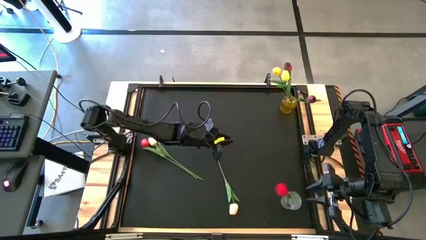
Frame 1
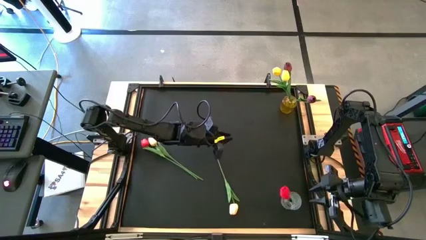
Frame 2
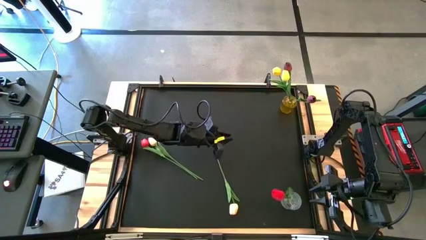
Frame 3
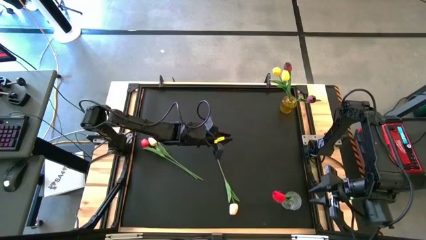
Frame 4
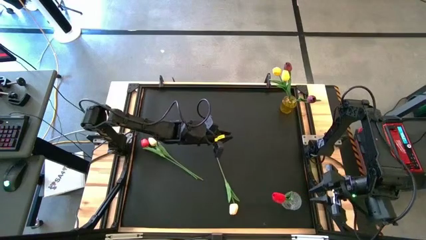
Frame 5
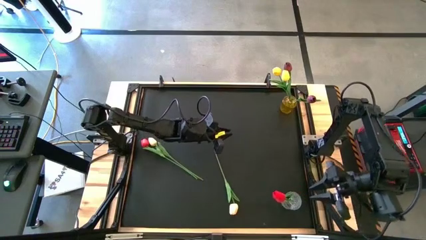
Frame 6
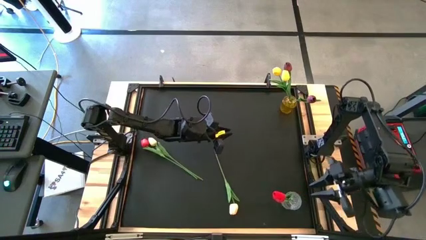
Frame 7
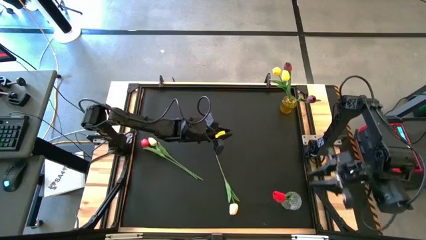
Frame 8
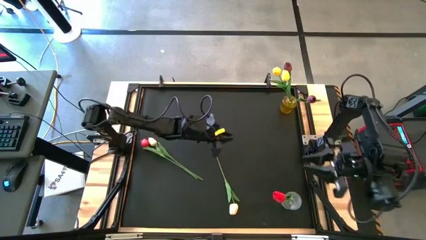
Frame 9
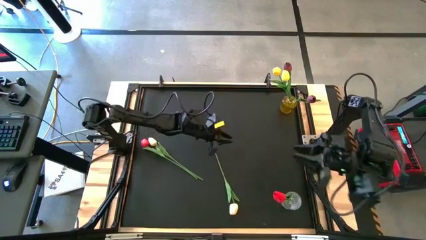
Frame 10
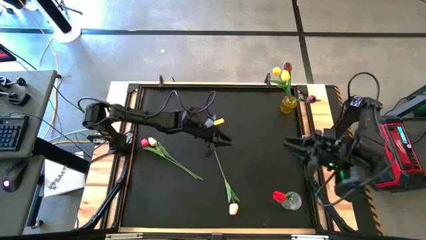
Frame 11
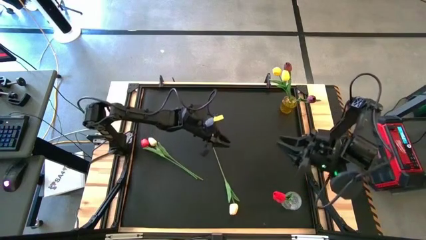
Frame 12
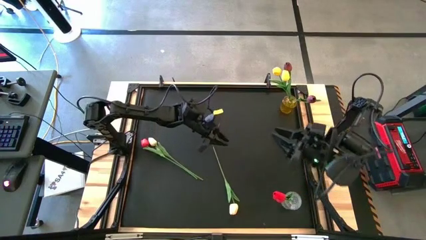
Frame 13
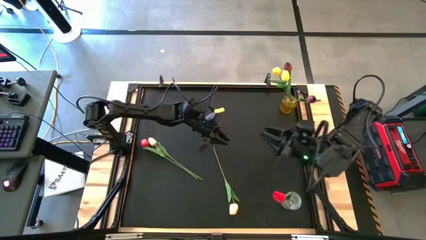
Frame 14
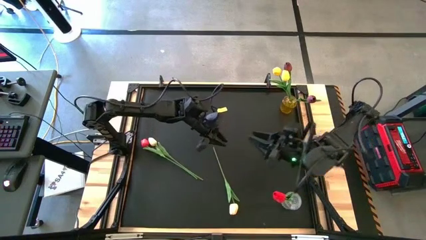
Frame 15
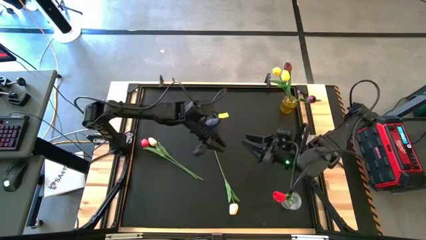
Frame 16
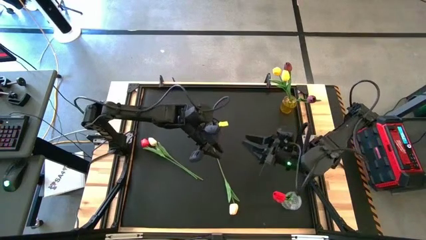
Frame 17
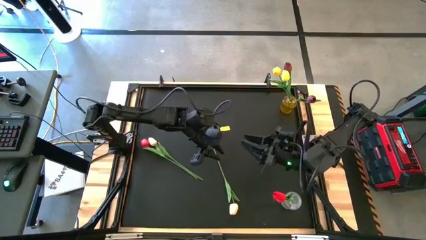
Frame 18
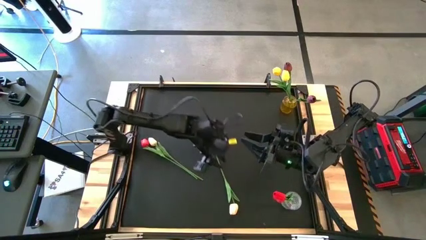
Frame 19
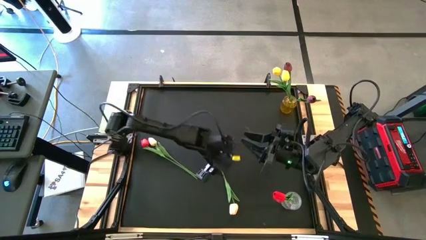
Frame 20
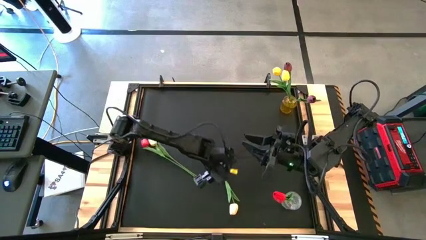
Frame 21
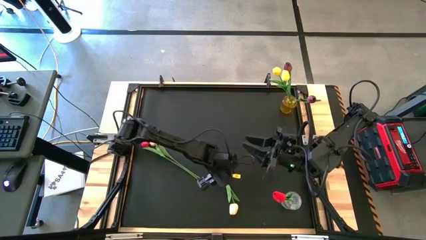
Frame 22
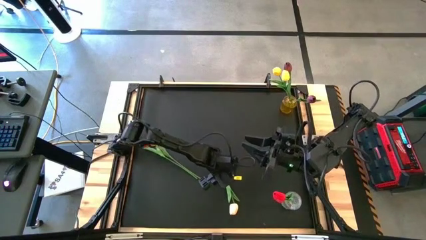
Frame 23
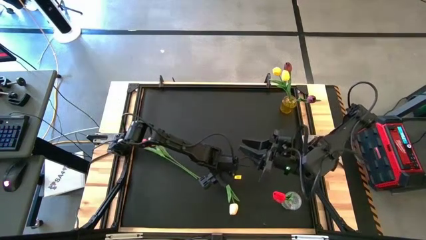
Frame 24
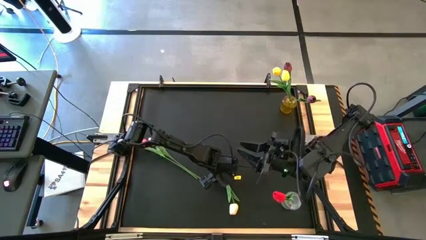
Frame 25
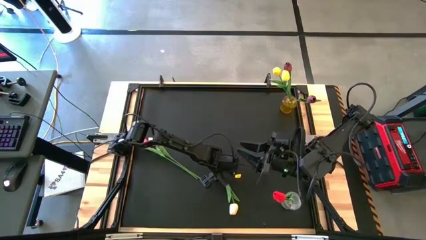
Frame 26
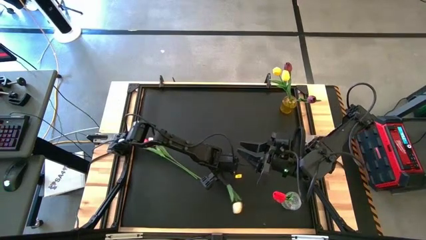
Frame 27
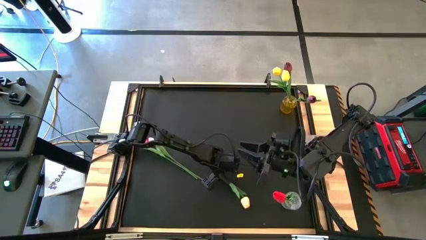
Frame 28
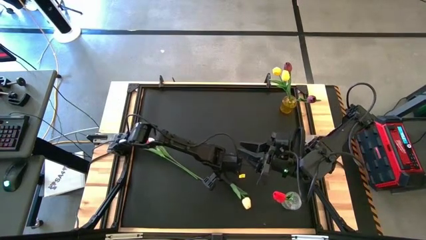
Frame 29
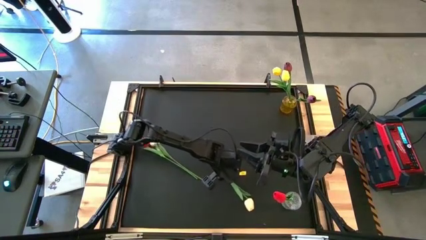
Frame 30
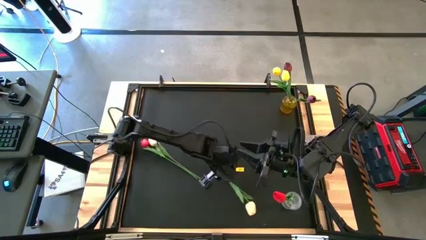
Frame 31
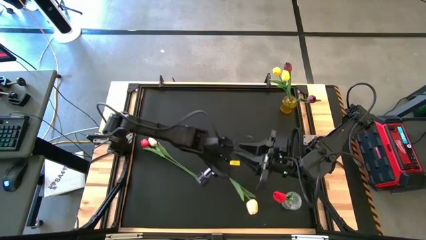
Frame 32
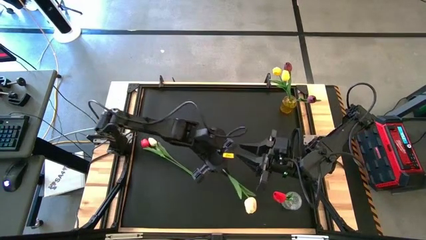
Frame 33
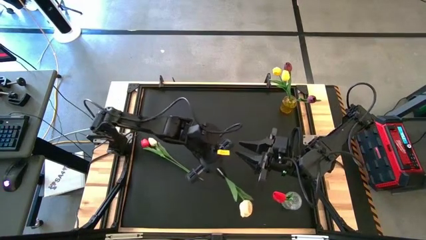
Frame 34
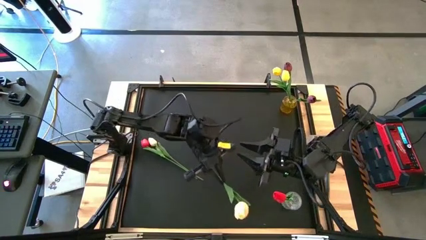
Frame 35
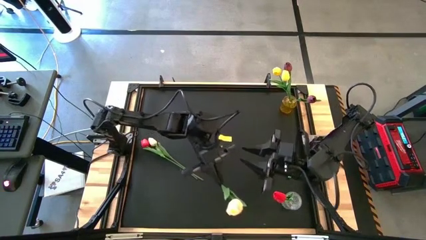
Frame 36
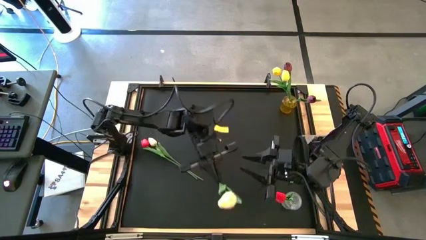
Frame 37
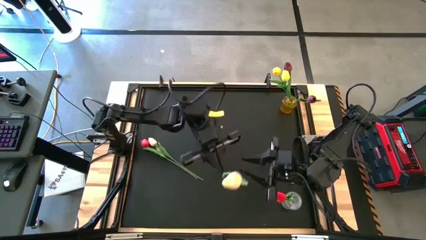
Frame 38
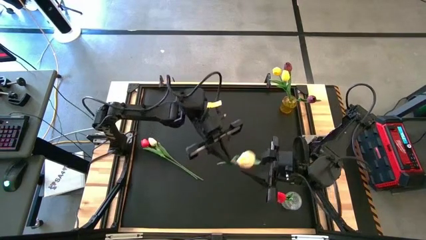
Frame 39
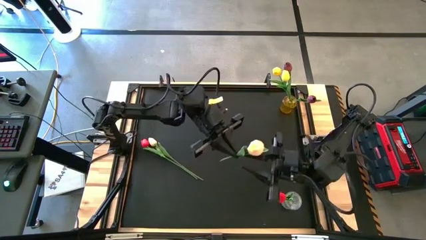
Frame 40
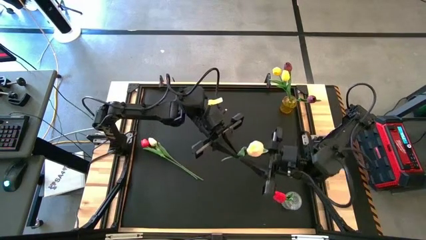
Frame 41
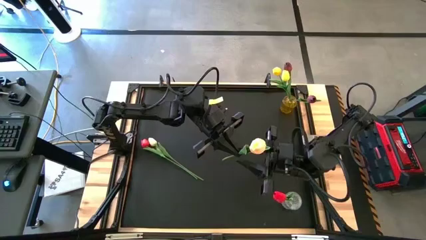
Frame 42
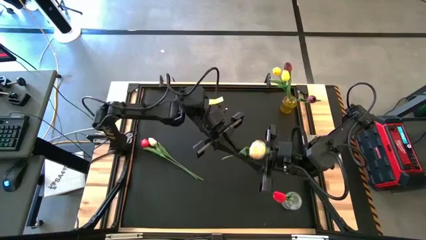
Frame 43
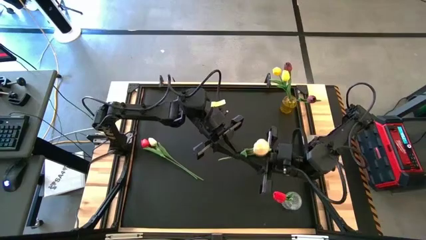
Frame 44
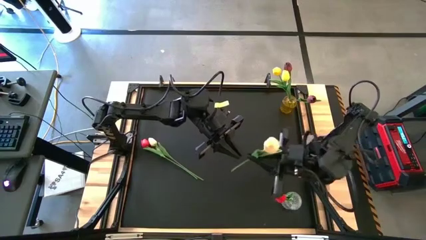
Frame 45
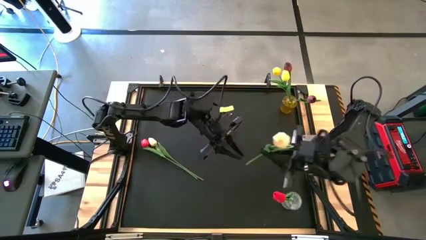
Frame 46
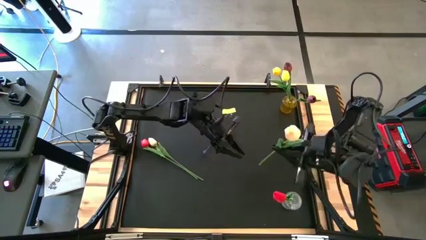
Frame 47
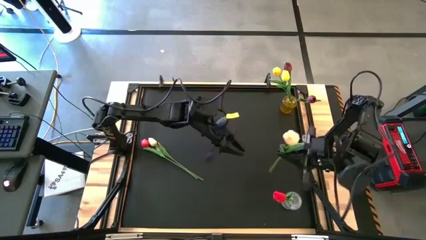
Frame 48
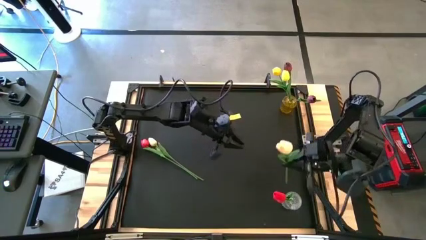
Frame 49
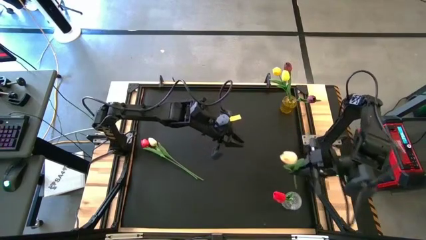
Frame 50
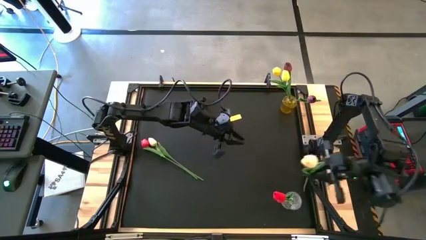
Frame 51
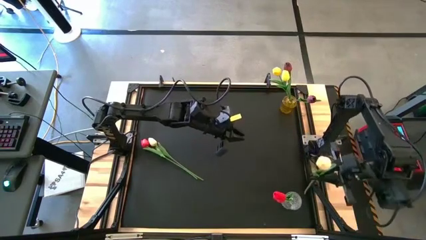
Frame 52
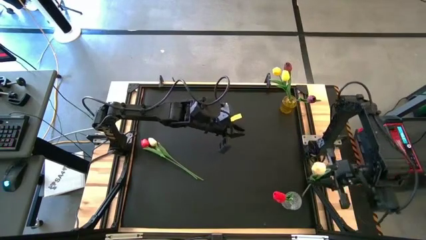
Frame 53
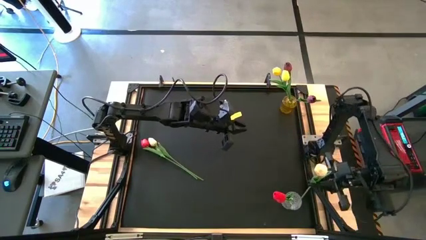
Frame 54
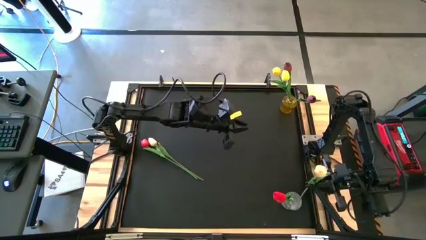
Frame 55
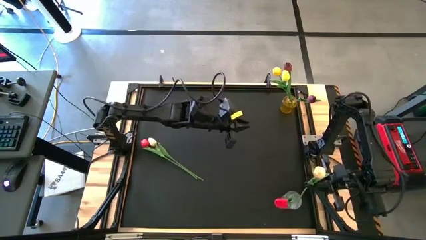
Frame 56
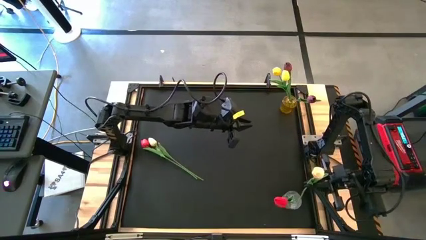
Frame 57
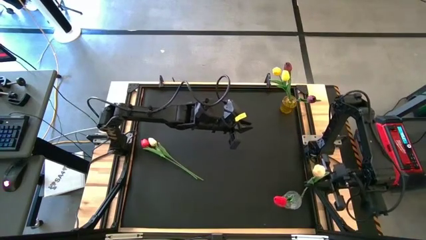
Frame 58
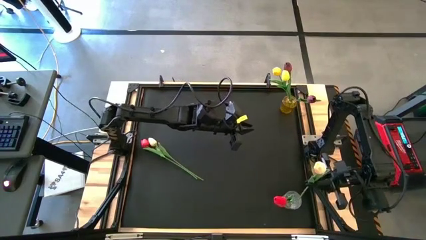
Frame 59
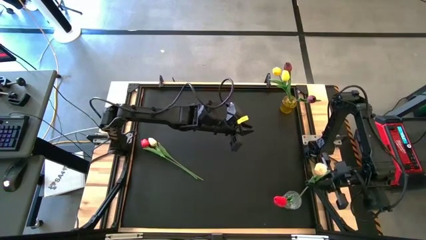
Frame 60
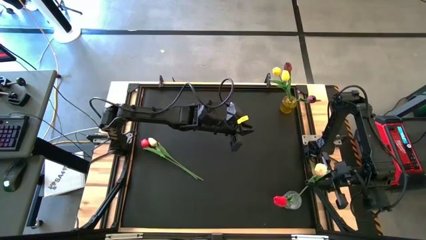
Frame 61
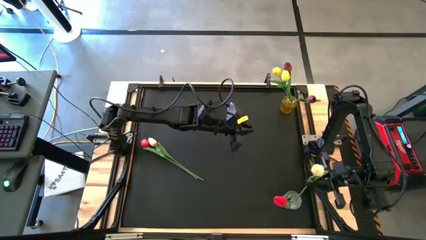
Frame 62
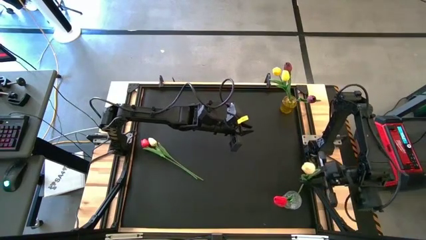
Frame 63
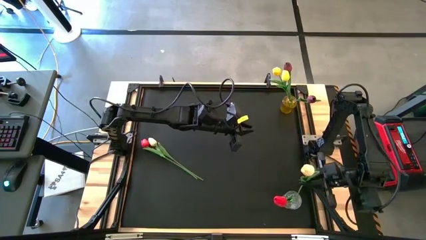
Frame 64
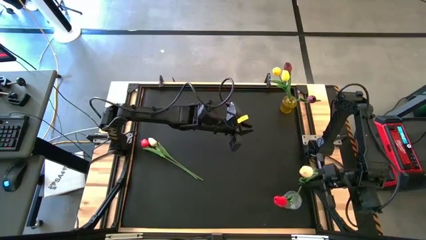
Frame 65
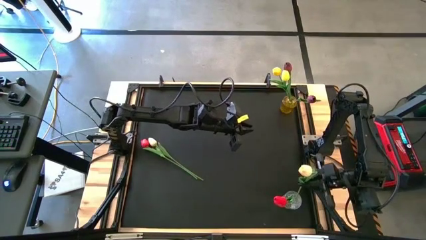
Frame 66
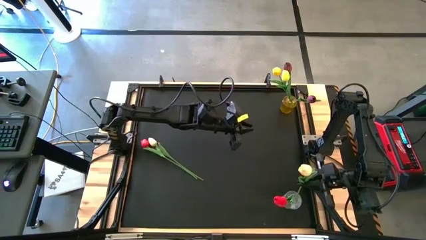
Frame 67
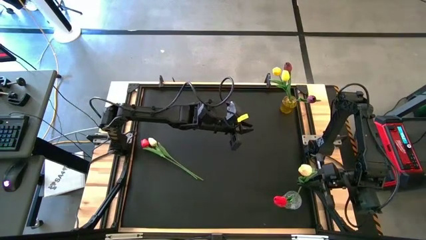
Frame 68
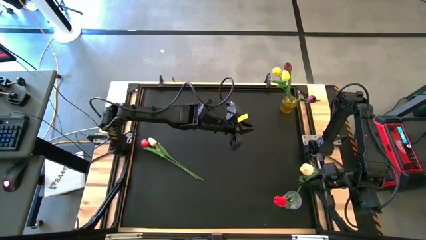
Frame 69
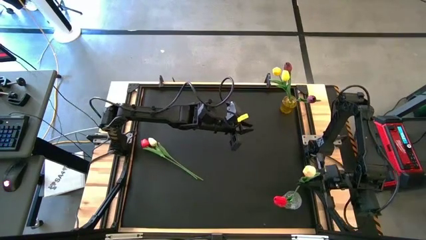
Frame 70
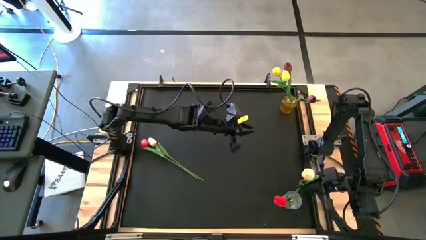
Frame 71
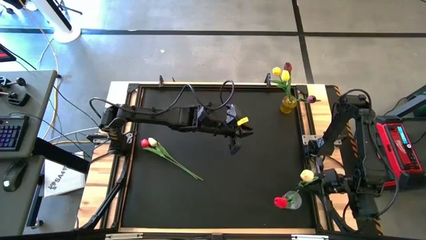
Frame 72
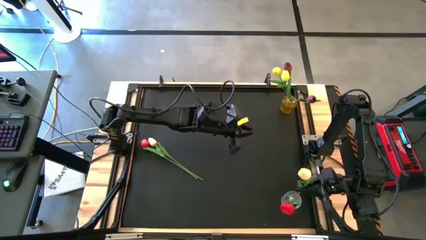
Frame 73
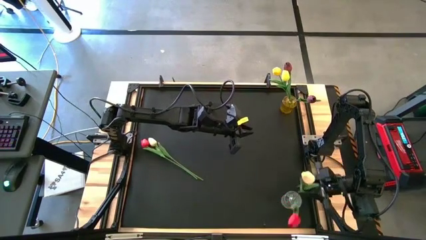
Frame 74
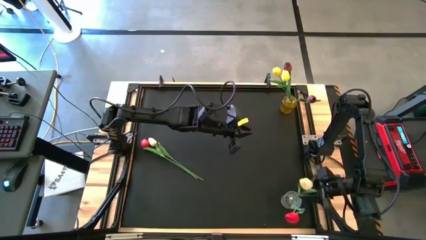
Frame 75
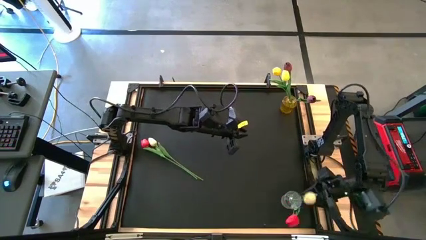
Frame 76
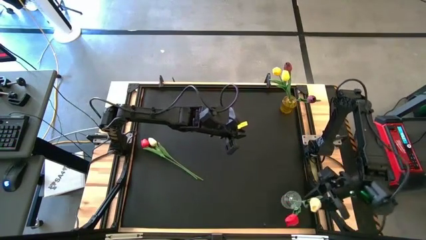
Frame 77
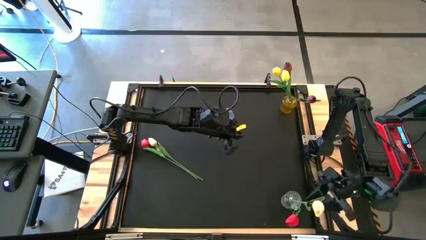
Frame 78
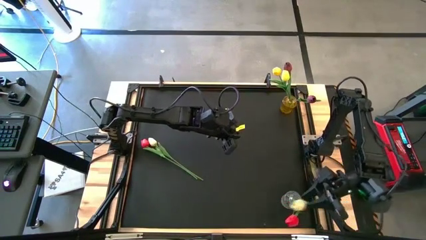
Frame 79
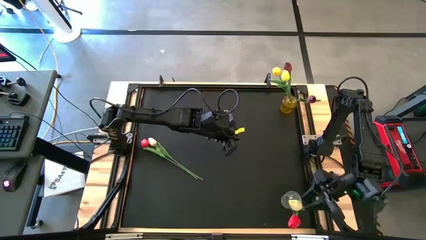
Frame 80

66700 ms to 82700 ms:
Task: Sort flowers into vase by color
Put the bottom white flower into the transparent vase
